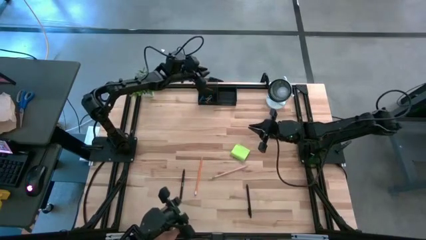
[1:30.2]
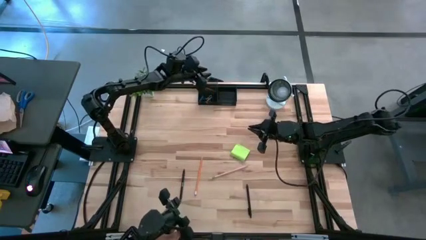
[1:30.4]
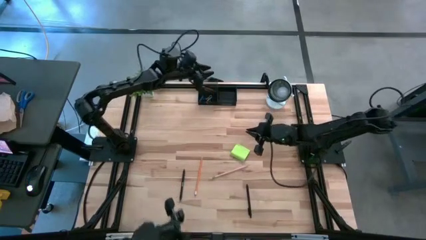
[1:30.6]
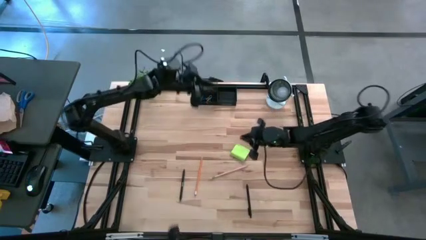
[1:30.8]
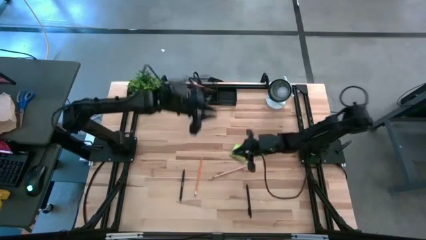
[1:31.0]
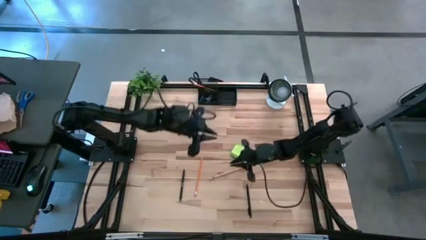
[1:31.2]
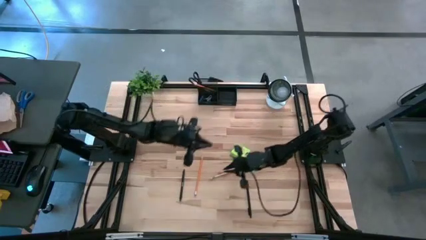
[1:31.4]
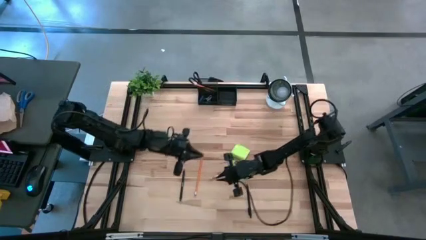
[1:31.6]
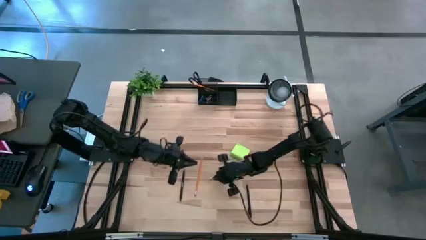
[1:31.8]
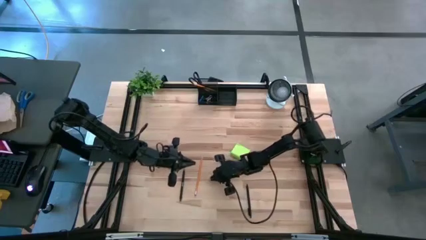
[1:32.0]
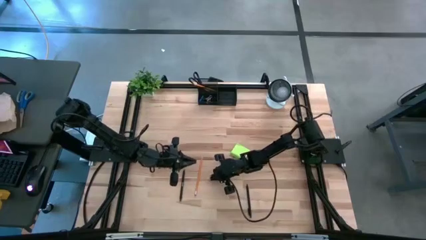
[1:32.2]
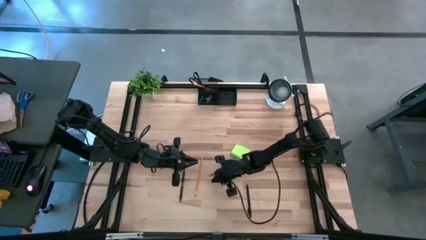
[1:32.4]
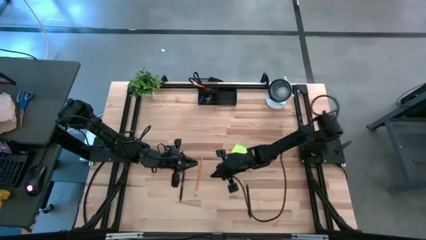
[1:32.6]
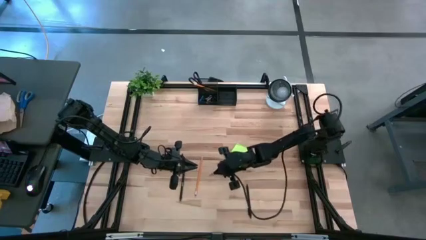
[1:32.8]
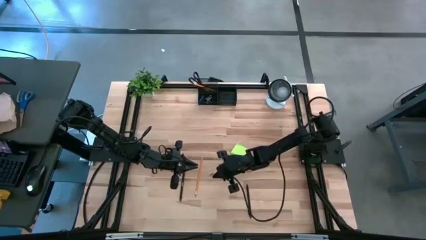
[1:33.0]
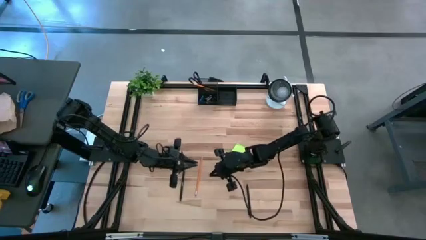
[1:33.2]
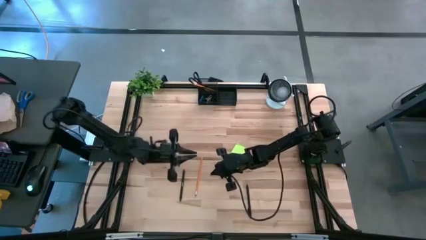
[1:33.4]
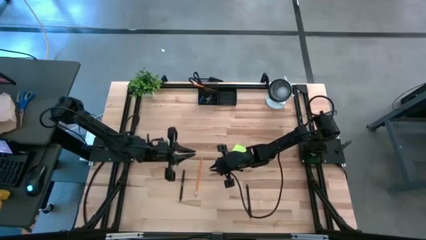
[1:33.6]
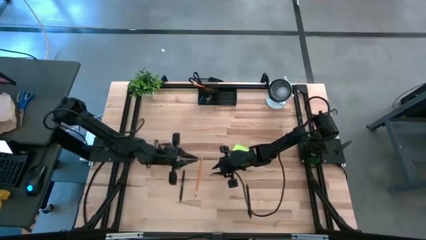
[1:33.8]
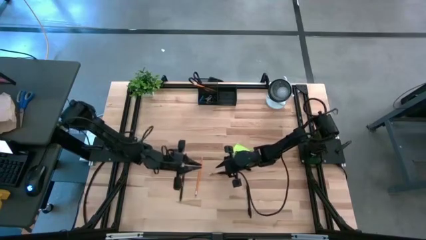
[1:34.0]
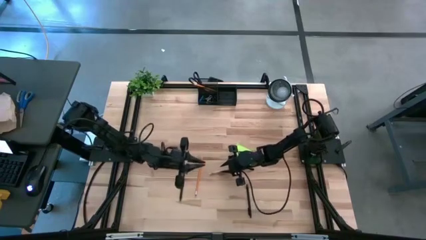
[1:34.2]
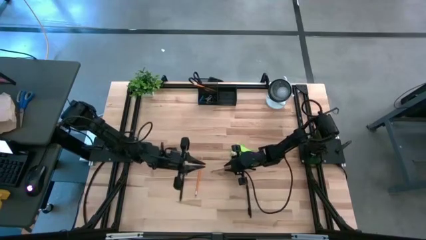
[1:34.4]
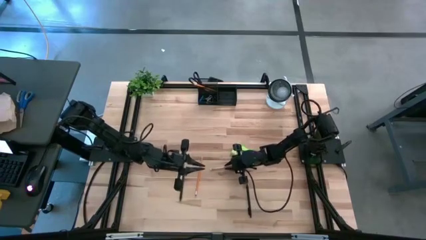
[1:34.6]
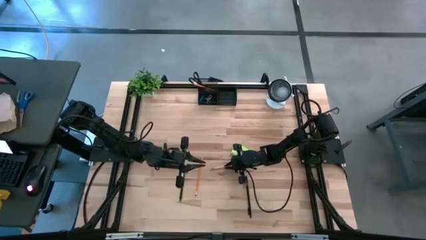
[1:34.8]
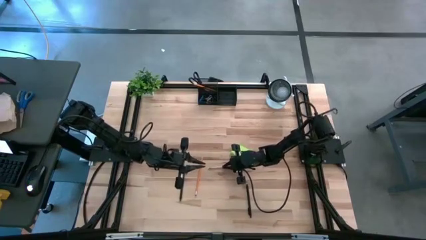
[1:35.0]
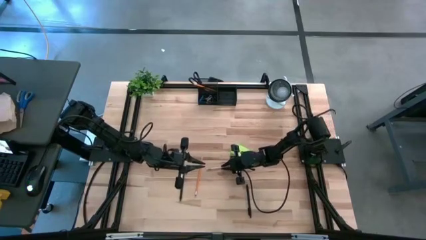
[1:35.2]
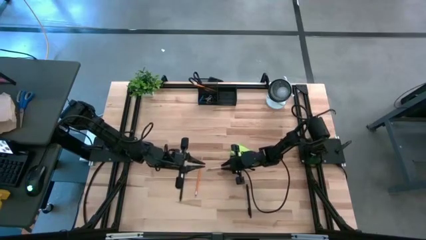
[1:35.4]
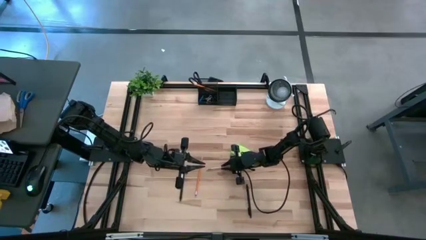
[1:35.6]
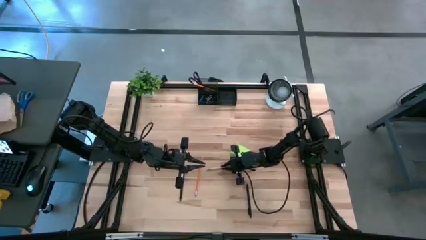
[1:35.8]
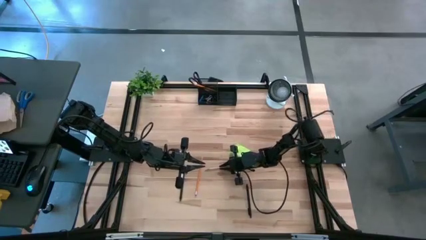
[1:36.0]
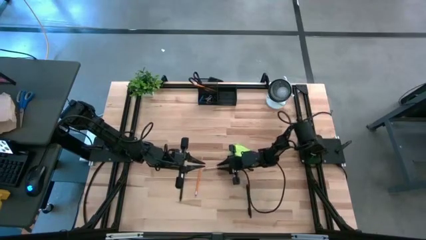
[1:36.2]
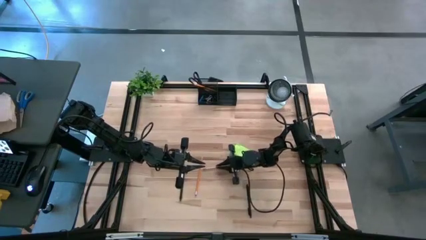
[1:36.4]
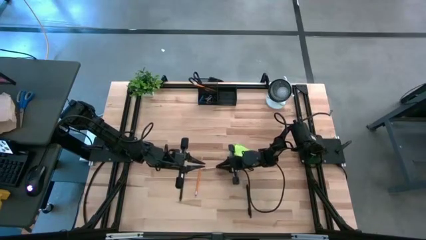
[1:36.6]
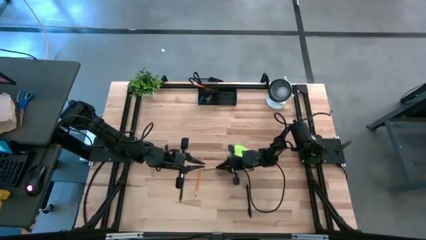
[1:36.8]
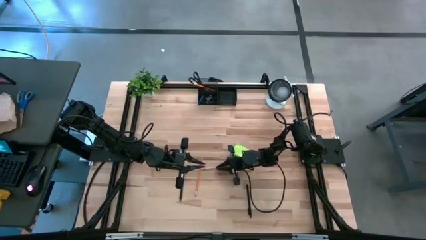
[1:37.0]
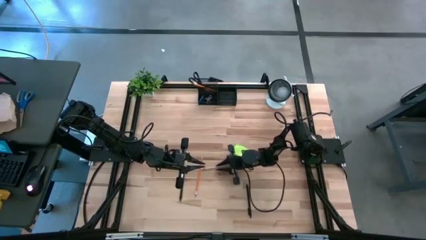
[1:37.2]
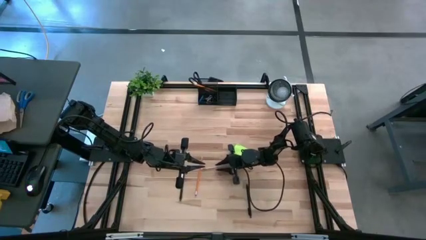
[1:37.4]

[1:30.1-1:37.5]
Task: Pick and place office supplies into organizer
Put the pink pencil into the black desk organizer

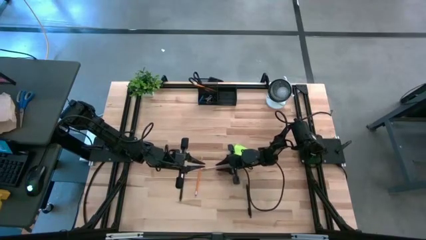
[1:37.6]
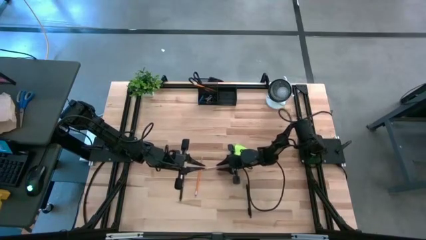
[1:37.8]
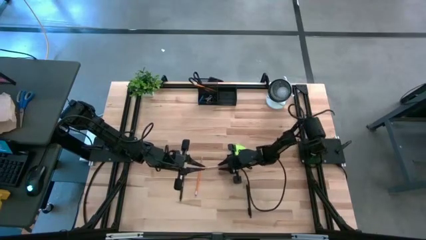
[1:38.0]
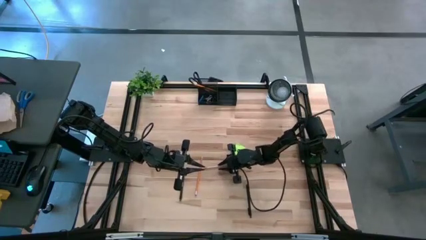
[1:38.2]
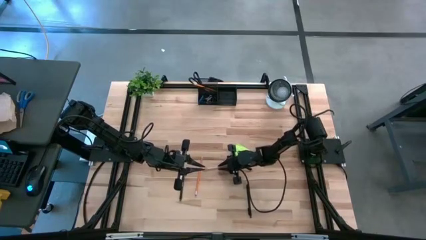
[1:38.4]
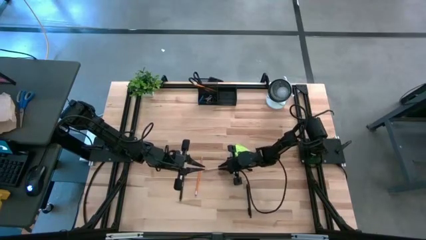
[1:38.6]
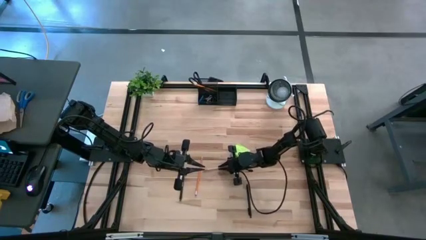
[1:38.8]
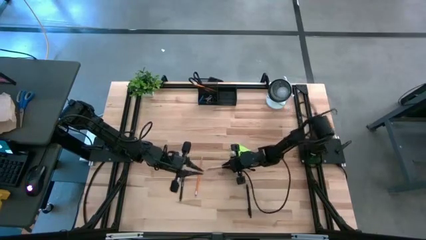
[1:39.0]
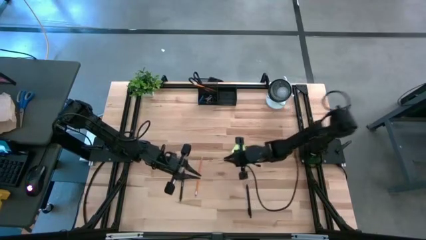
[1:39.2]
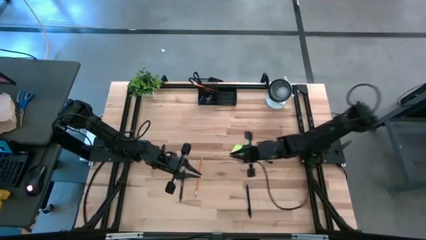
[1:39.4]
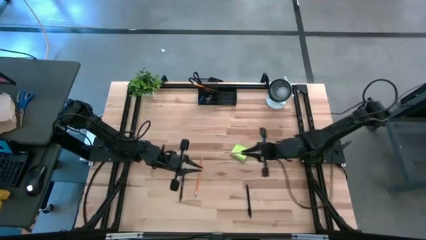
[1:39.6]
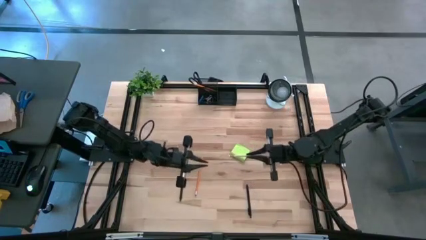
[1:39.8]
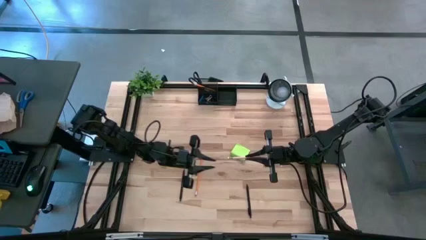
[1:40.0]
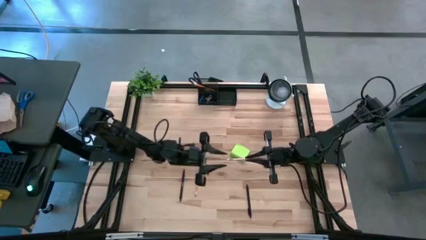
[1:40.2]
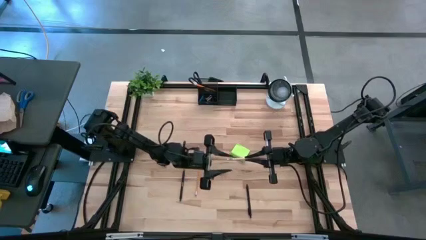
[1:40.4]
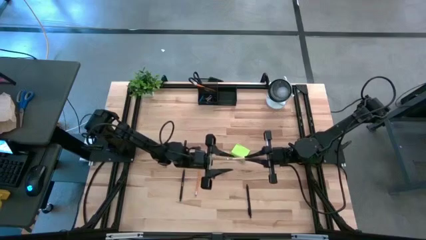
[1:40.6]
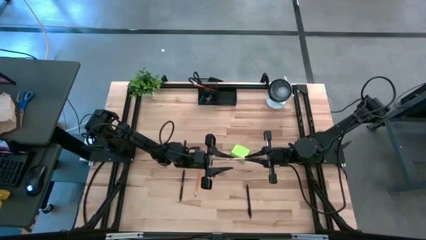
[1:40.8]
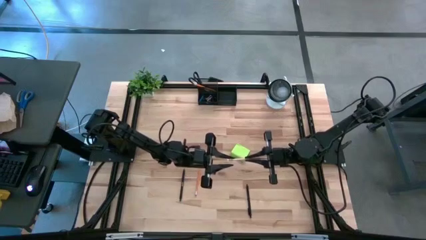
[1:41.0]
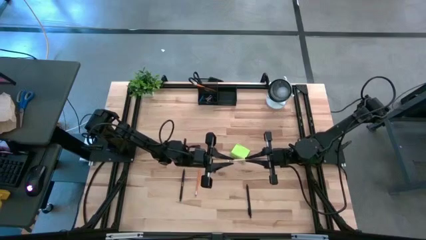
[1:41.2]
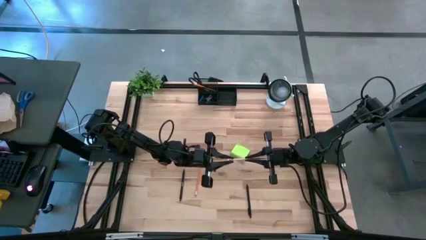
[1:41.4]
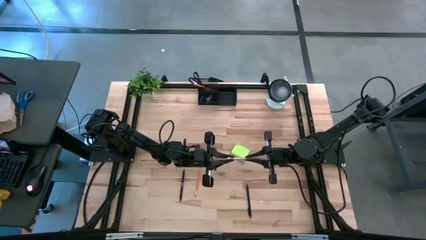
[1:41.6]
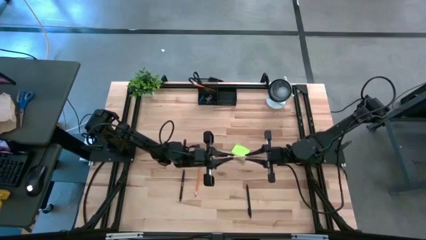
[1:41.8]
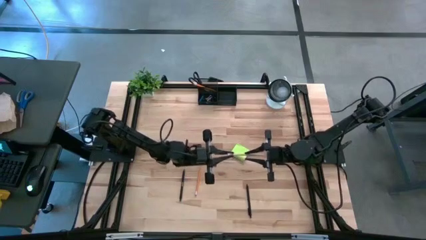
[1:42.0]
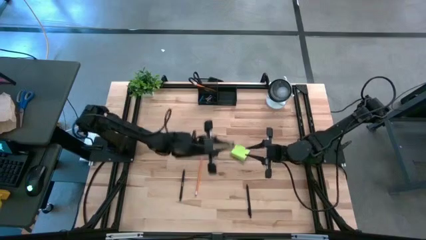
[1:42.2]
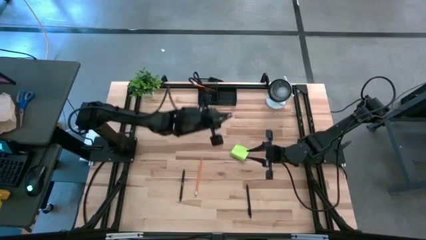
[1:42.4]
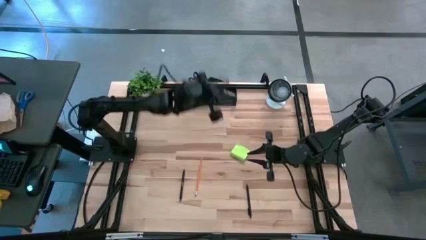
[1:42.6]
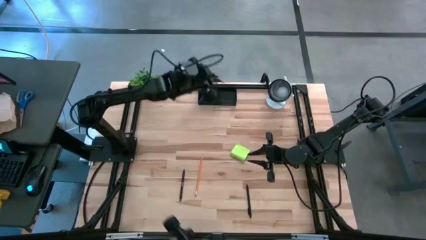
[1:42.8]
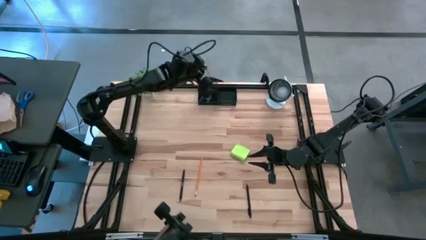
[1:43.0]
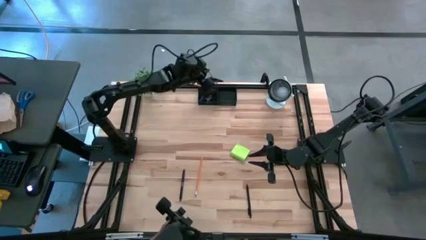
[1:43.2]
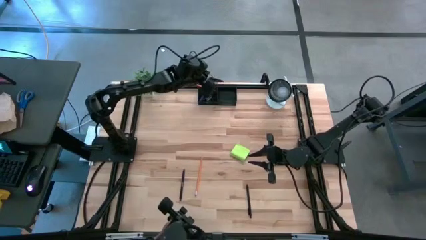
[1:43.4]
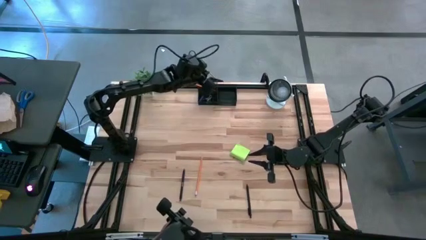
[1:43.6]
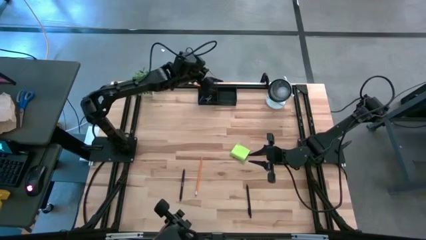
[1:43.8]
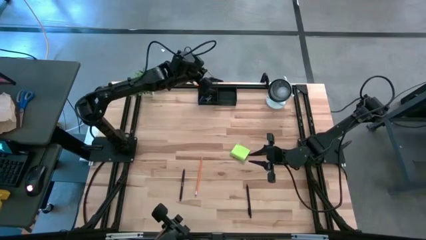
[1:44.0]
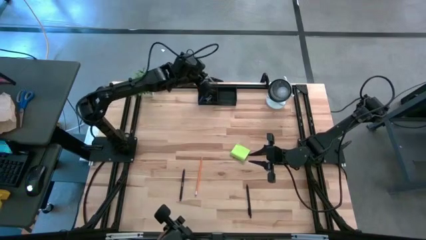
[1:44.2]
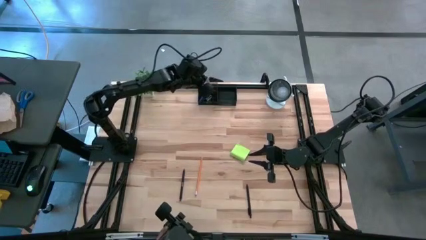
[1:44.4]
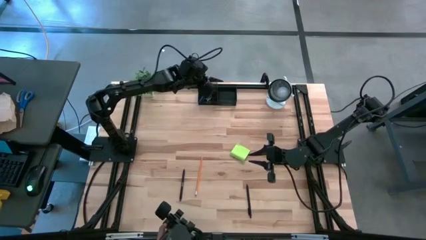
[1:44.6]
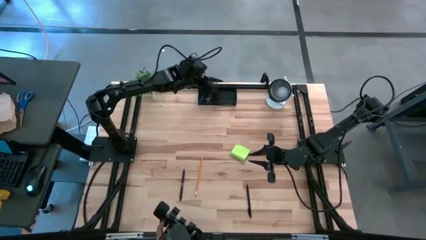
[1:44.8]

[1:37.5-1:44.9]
Put the pink pencil into the black desk organizer
